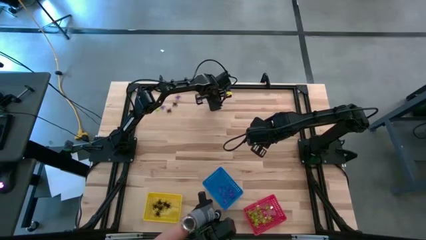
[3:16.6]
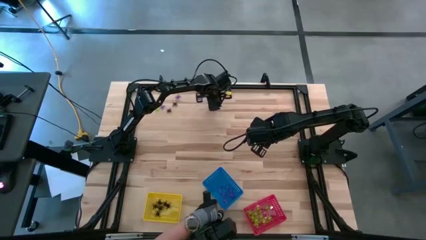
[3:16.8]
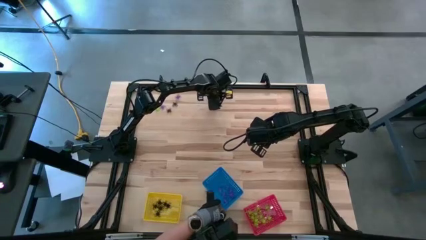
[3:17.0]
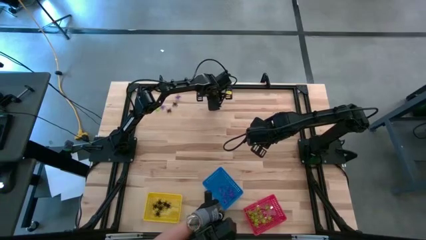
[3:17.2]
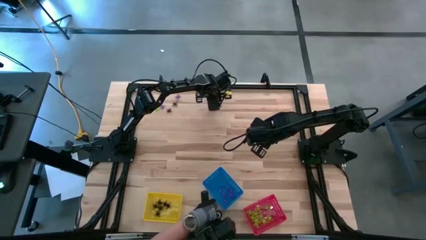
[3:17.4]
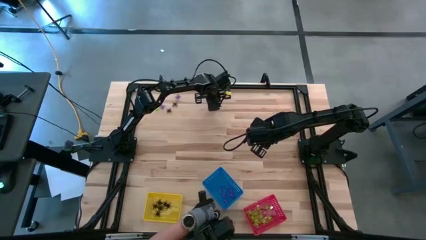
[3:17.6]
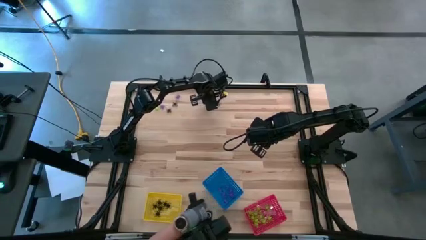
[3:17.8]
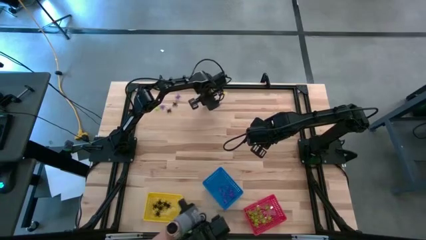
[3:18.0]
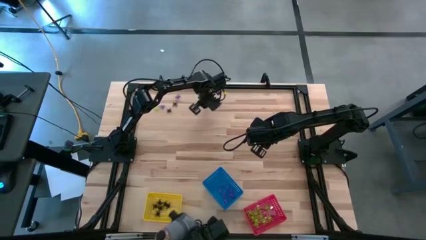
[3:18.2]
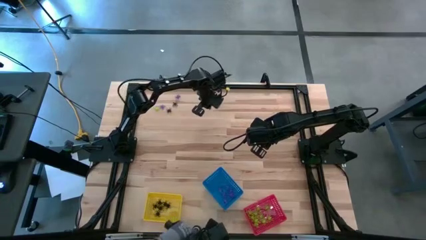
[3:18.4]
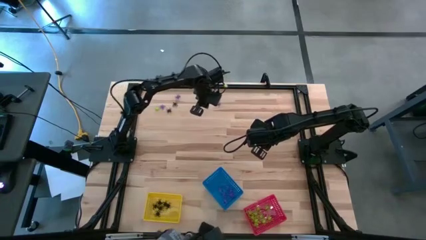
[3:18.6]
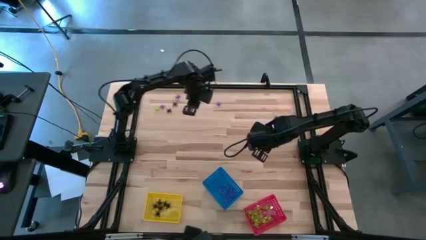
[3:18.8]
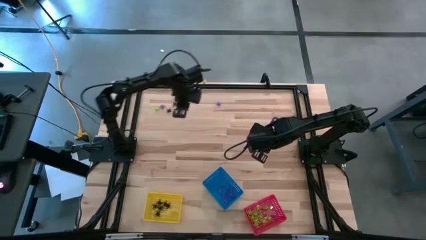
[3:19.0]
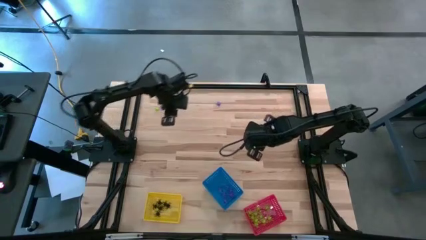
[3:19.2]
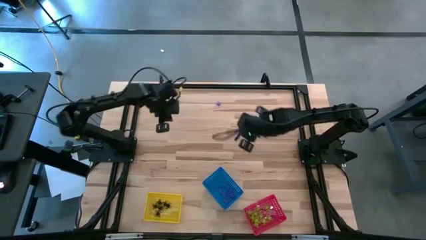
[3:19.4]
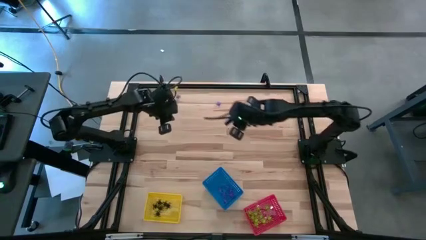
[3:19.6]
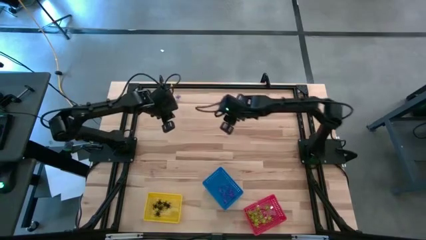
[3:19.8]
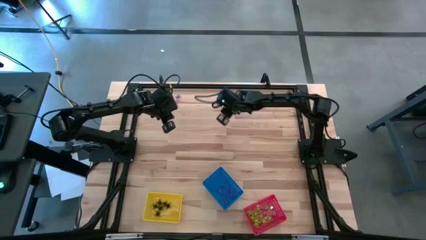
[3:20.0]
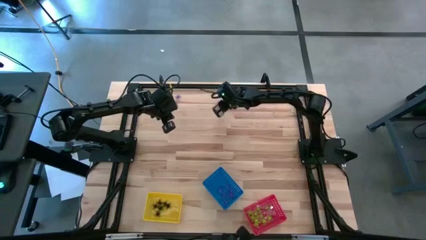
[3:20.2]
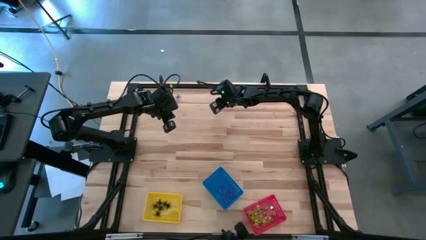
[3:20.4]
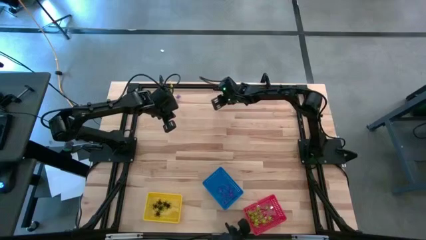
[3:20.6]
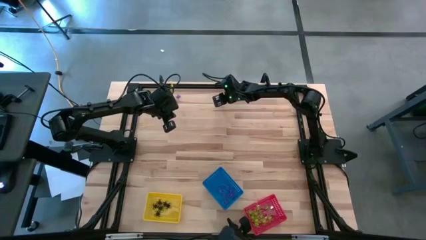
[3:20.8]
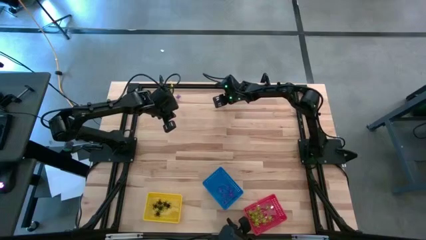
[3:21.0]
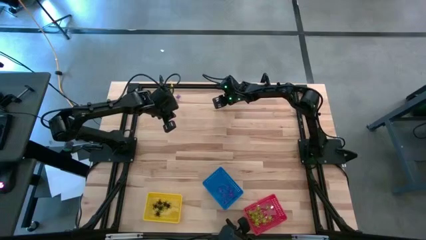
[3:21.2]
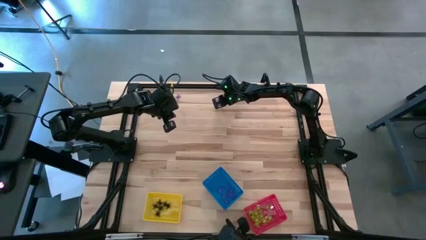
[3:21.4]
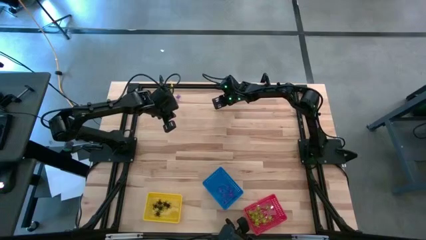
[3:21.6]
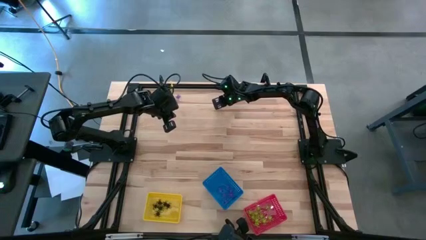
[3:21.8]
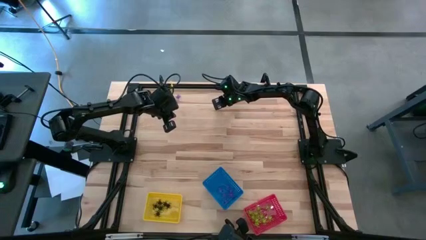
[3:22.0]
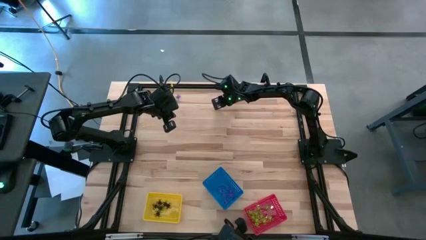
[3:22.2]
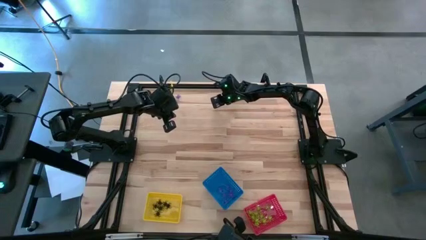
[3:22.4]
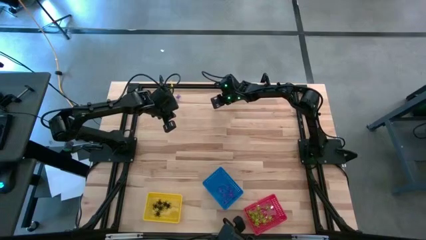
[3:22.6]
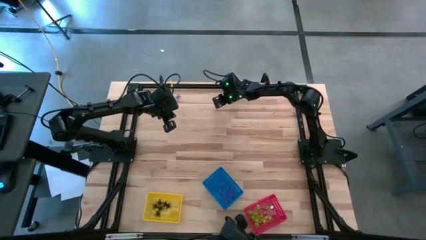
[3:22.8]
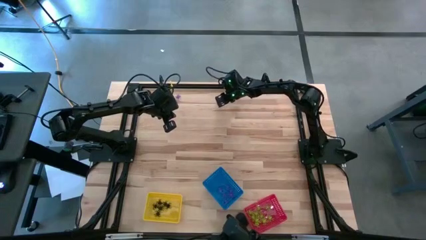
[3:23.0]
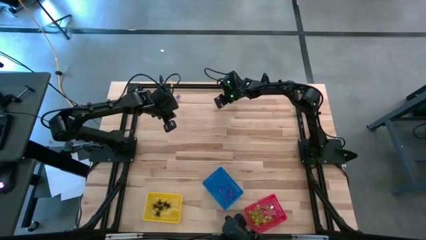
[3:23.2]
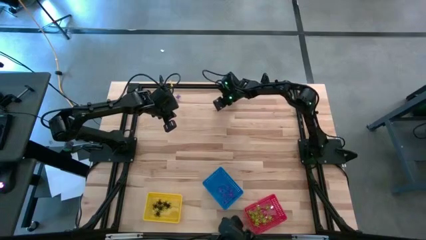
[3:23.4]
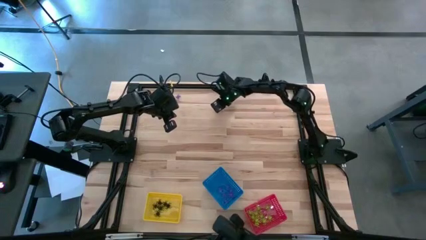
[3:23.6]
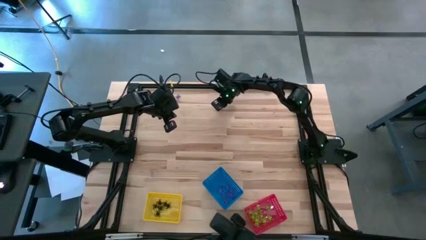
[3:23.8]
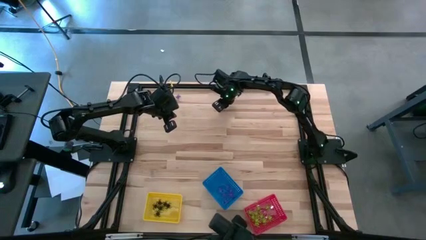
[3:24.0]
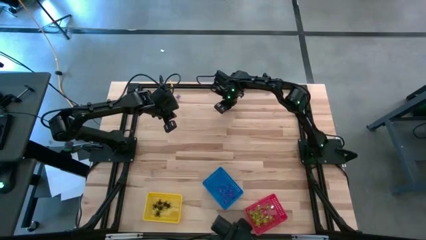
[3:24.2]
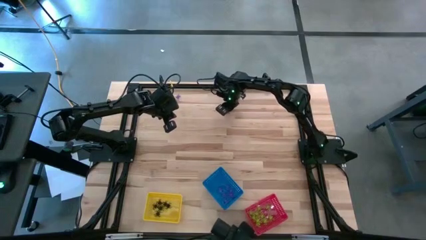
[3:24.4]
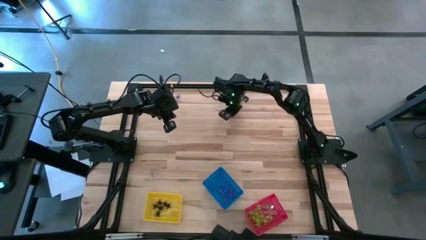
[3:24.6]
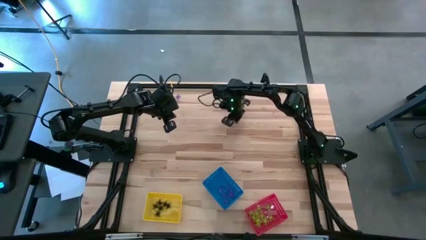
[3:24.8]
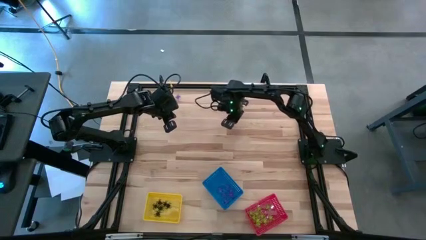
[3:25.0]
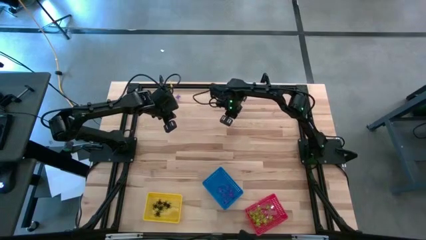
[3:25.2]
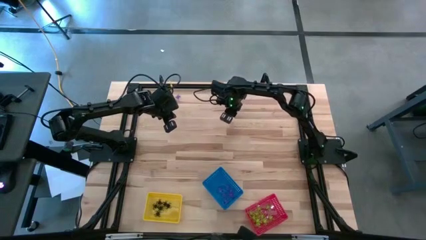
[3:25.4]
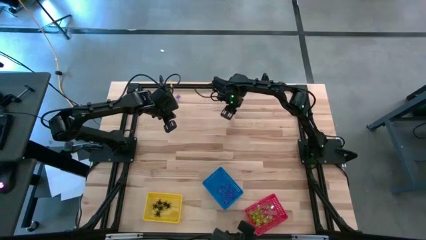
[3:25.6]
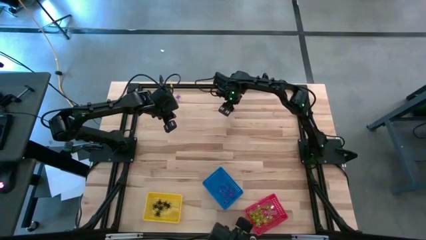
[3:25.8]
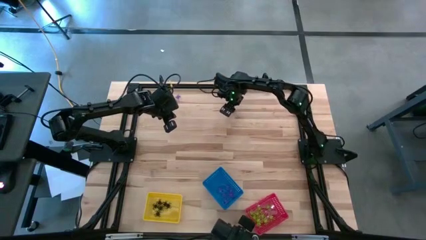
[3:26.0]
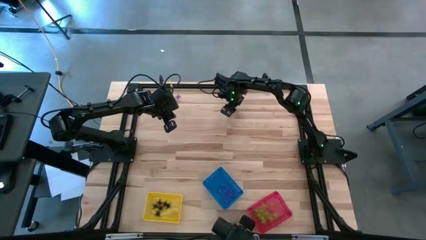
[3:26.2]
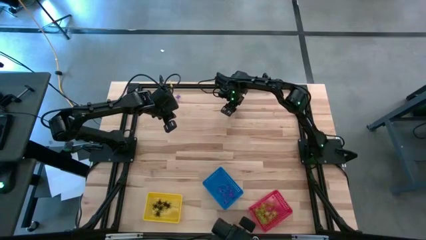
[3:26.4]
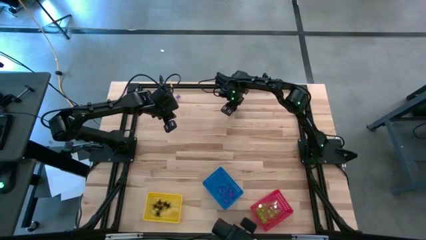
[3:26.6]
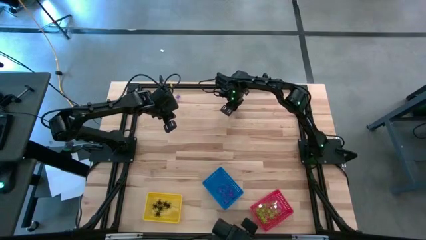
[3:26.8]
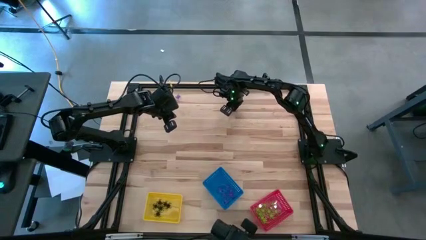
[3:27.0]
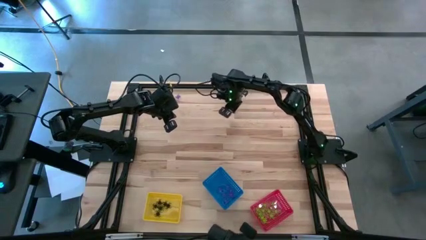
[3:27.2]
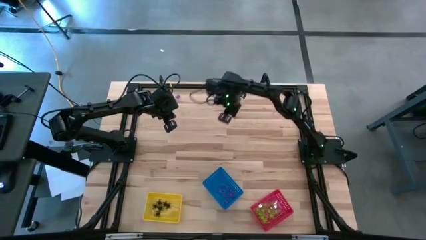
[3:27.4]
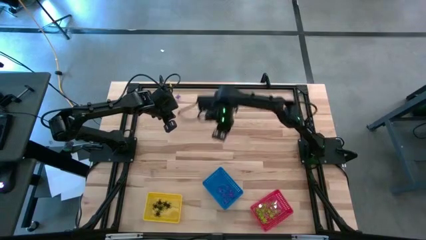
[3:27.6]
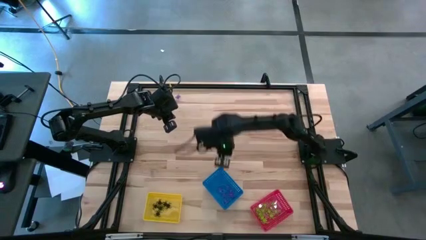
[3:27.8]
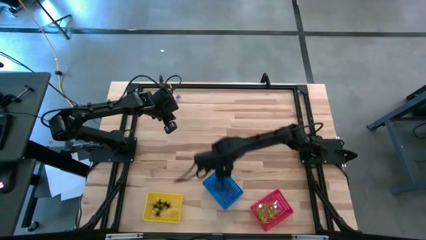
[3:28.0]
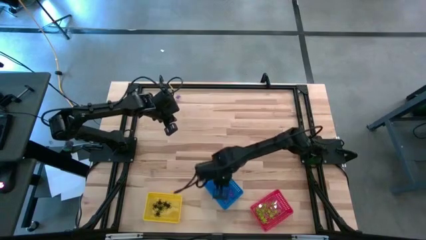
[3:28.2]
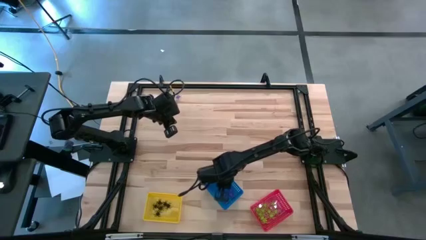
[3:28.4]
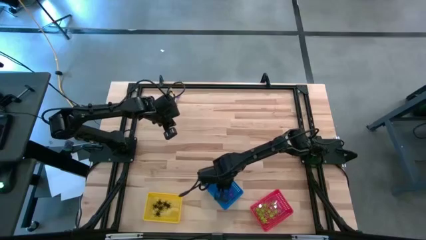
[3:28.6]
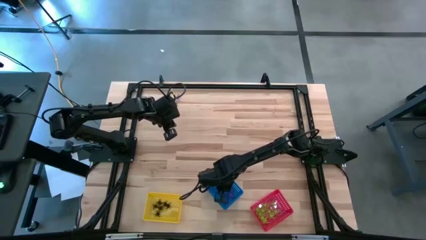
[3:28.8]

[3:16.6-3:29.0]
Task: Sort Halloween decoration
Put the violet spider toy into the blue bin

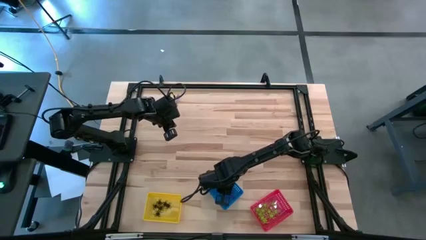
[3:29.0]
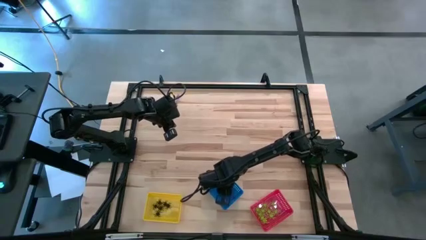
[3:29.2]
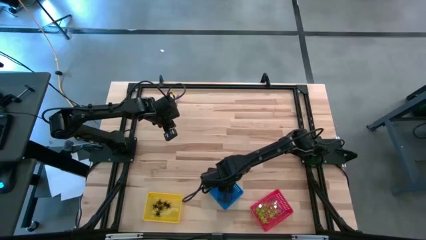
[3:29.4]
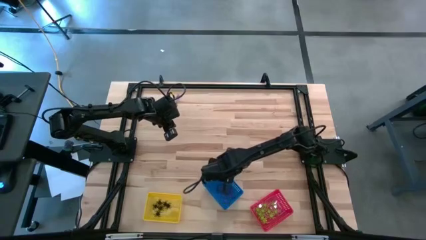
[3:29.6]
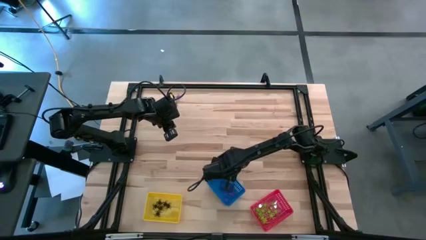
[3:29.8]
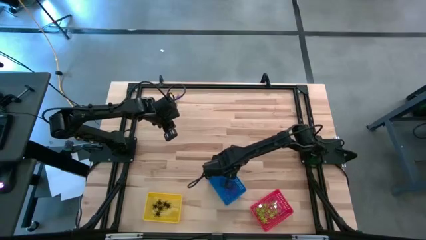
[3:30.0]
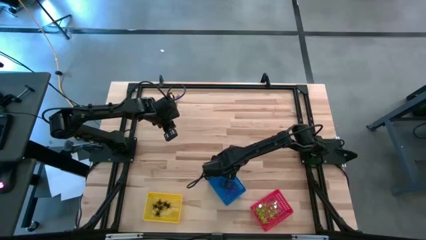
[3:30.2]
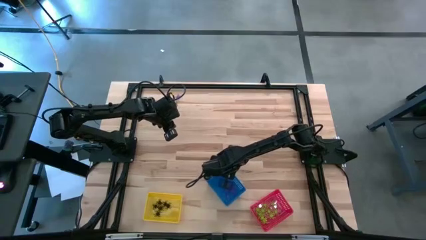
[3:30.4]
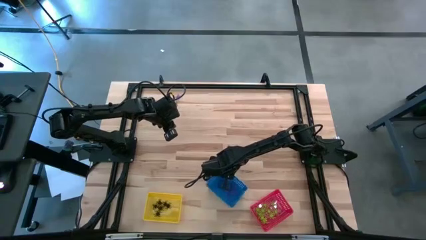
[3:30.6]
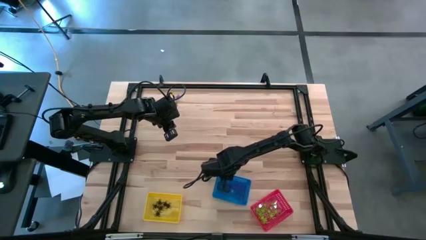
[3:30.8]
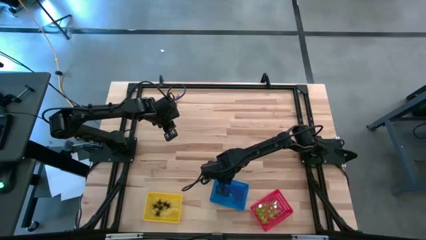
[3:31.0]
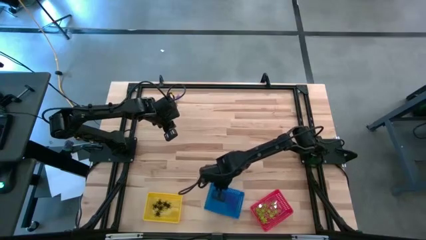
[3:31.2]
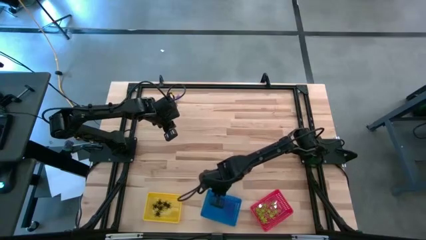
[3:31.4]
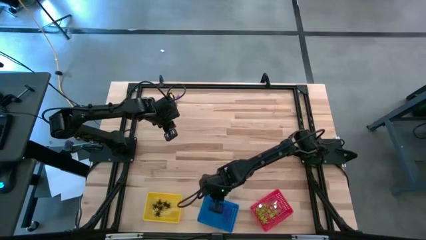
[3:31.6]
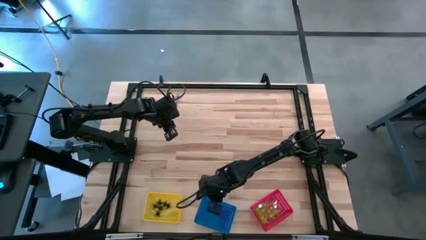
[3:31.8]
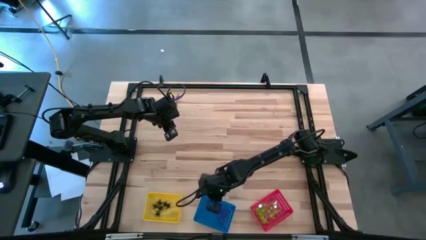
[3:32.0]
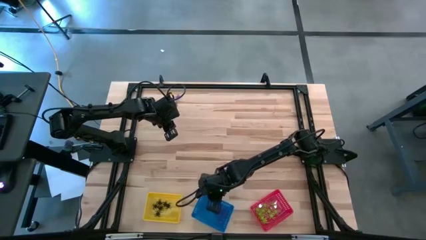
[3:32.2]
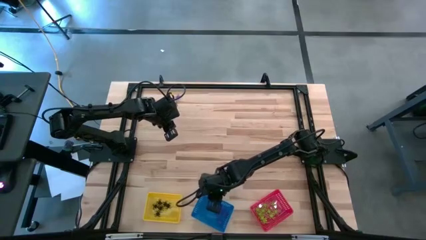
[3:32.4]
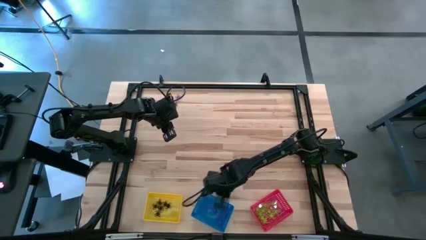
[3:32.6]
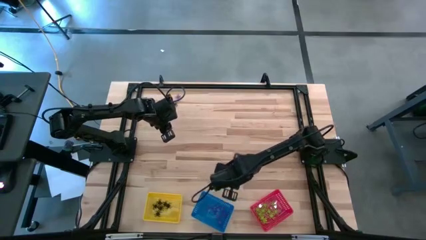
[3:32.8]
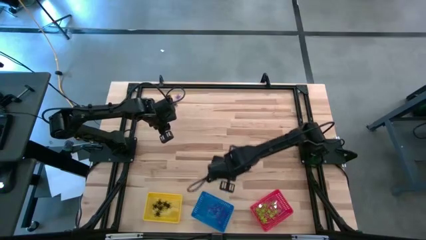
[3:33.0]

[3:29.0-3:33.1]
Move the blue bin to the bottom of the table
